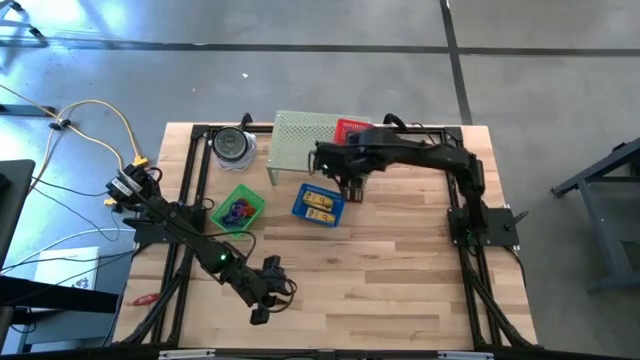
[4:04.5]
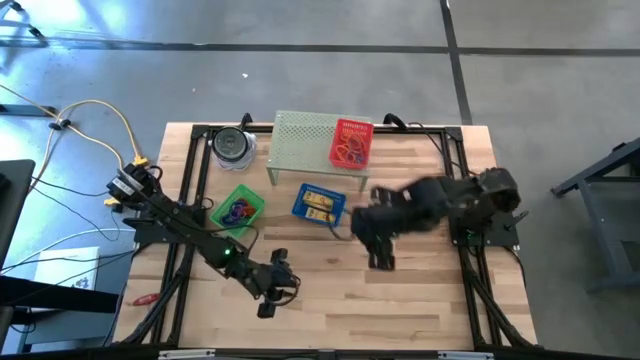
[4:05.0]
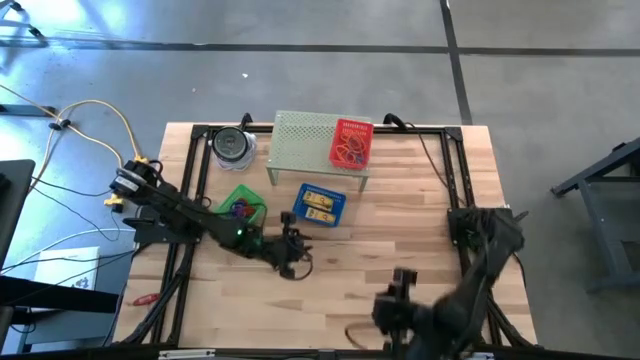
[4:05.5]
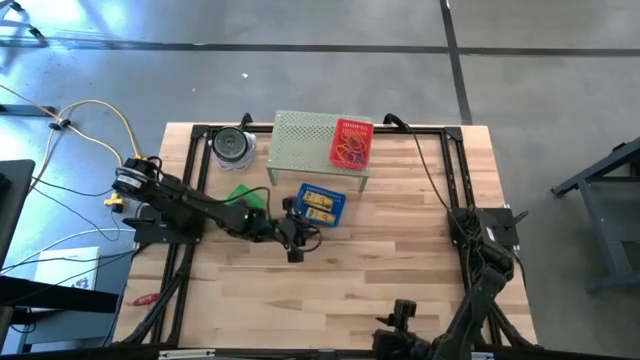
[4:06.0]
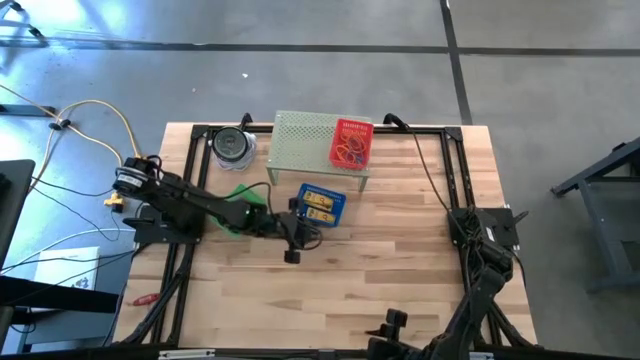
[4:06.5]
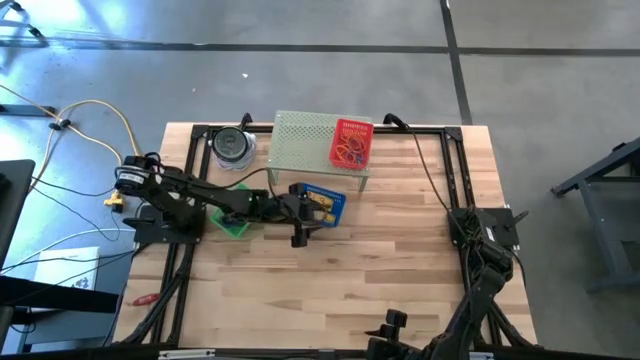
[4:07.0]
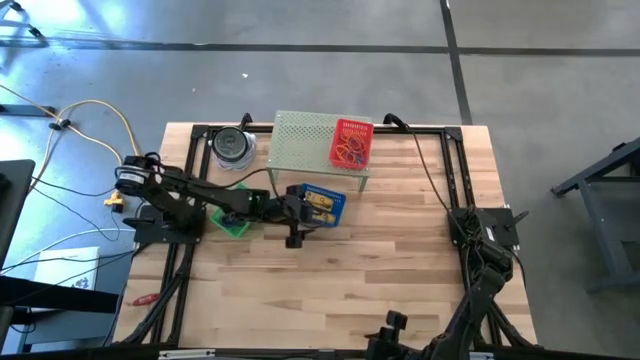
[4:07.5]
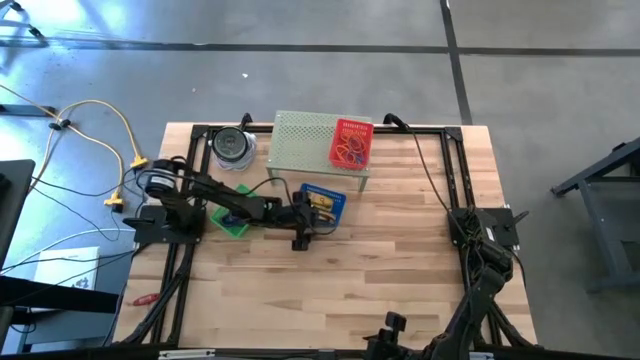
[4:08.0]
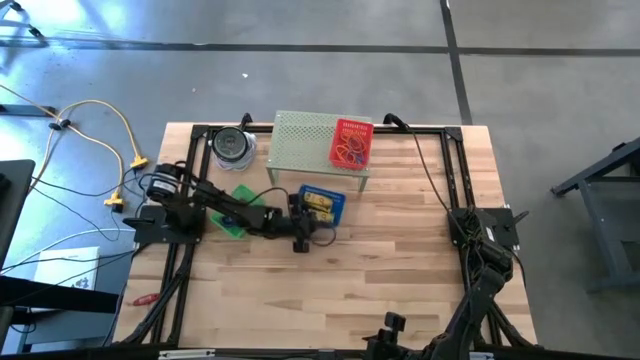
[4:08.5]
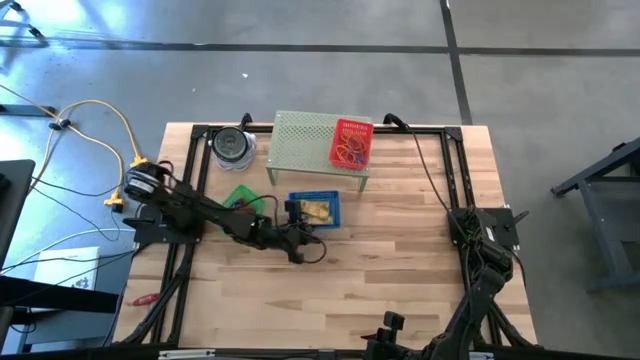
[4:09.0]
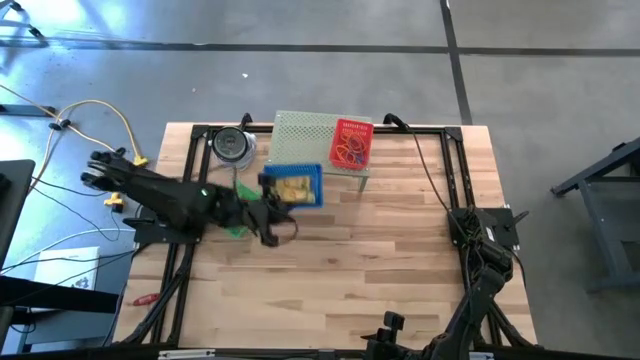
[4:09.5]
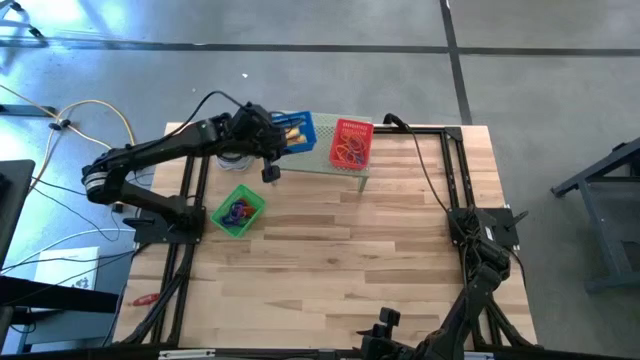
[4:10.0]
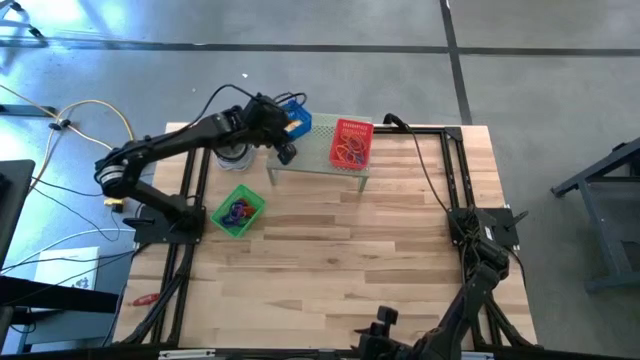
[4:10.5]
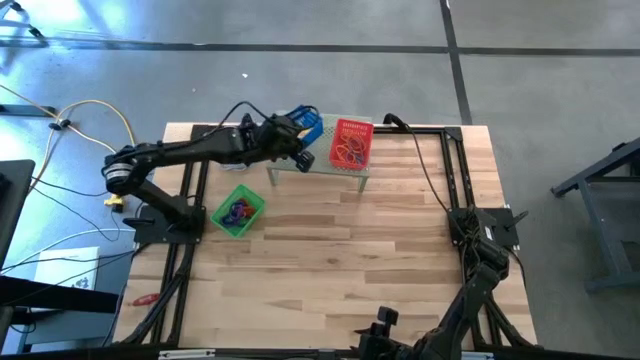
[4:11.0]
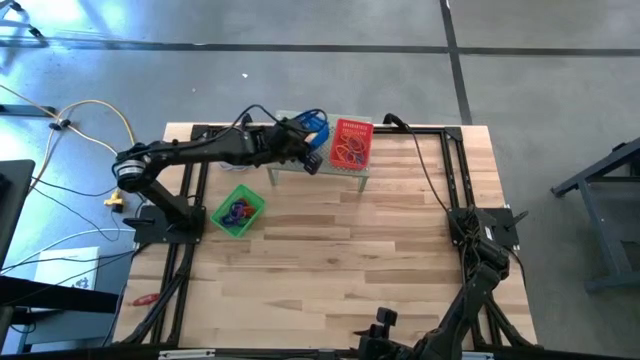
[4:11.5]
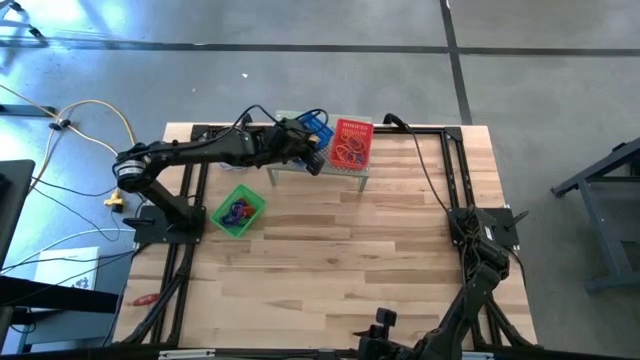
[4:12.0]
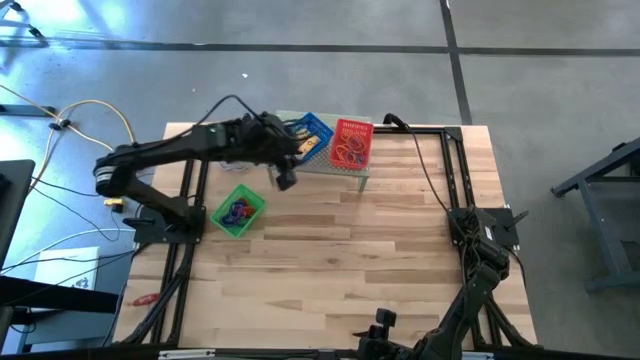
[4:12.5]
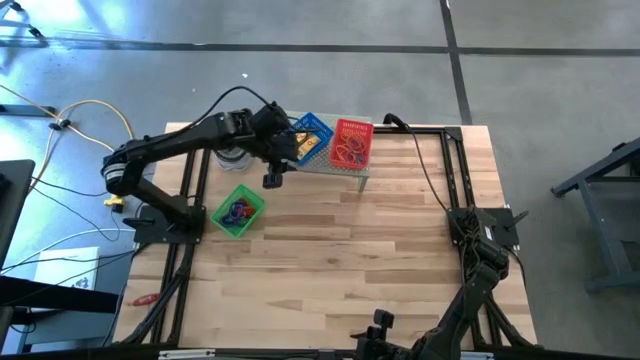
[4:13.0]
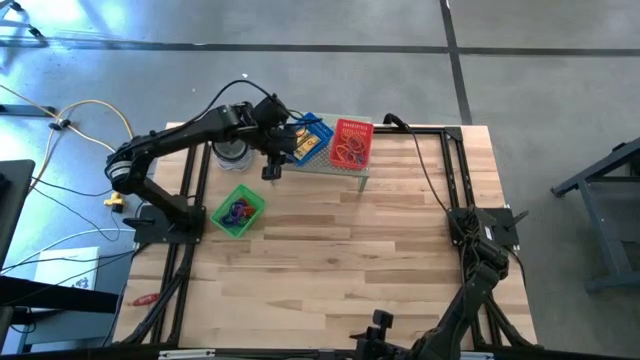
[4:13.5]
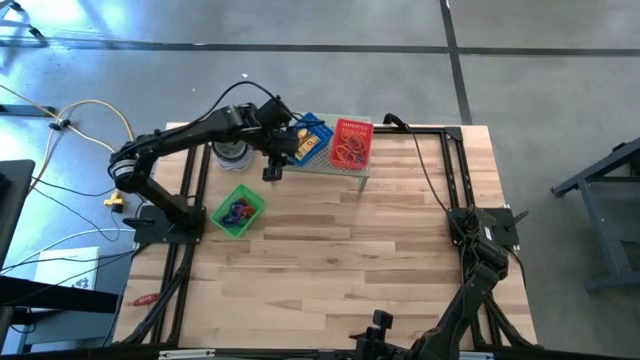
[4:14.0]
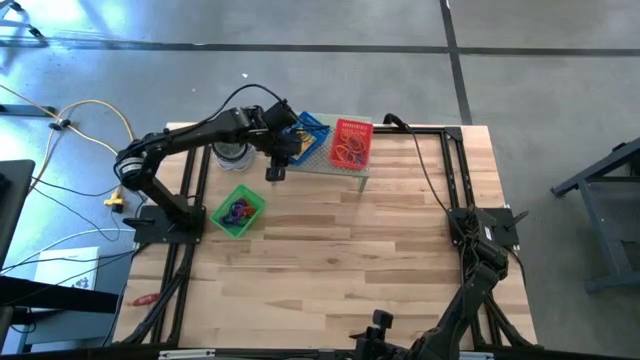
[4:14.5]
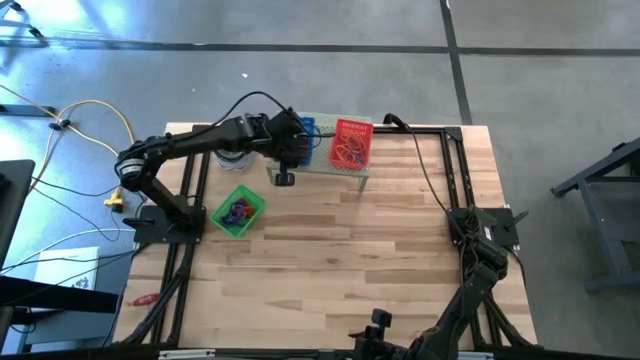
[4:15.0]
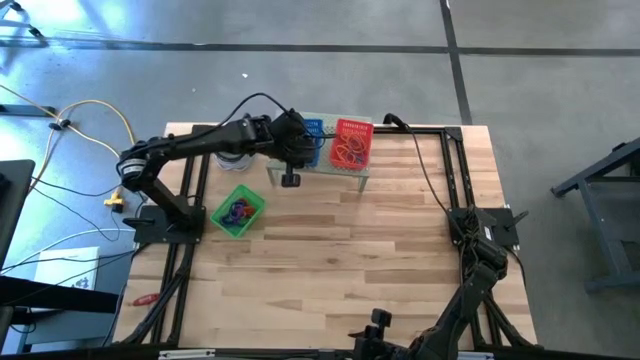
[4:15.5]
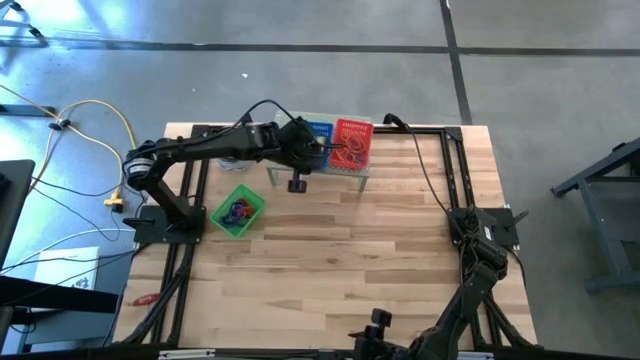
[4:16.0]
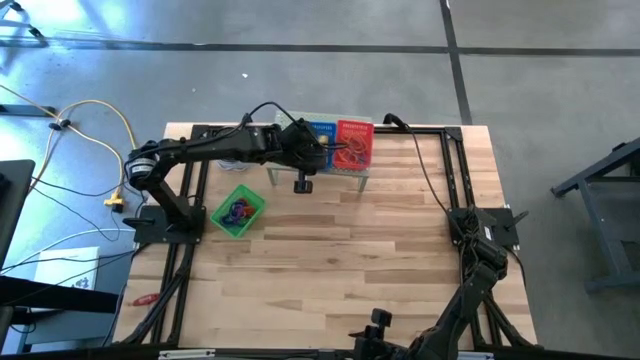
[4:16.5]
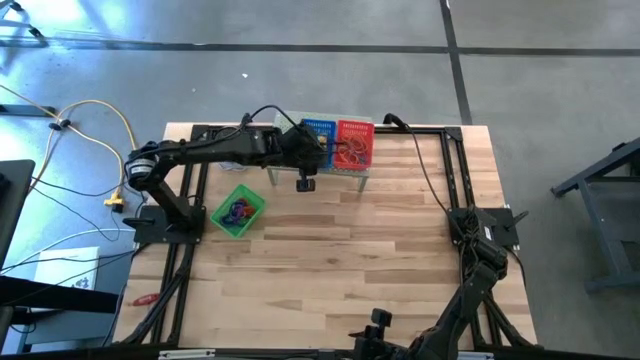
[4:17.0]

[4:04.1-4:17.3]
Task: Pick & Place Office Desk Supplies
Put the blue bin on the shelf

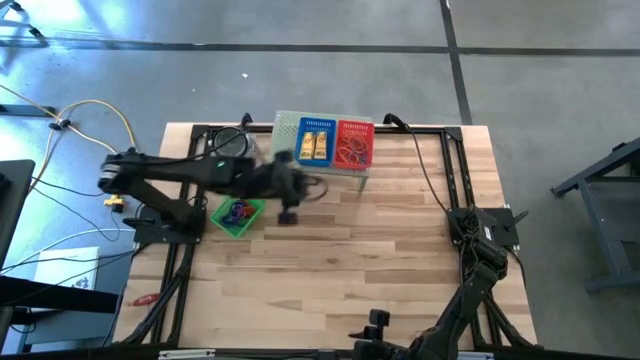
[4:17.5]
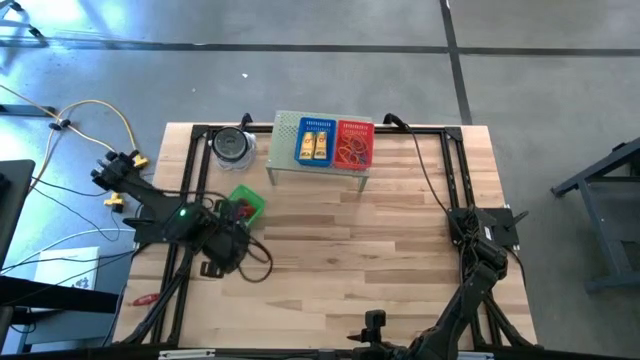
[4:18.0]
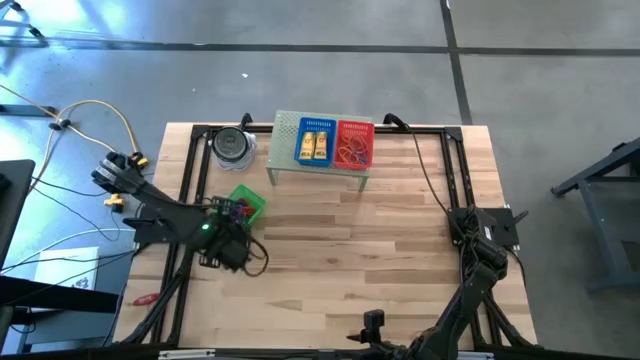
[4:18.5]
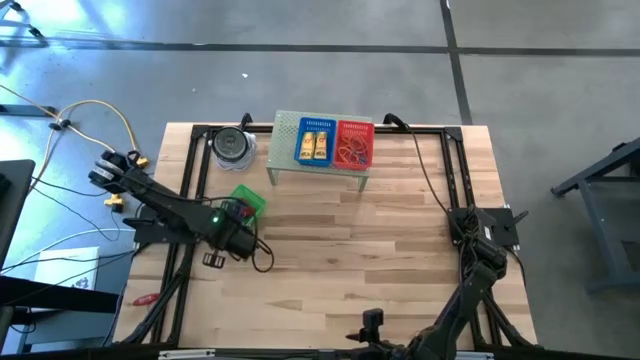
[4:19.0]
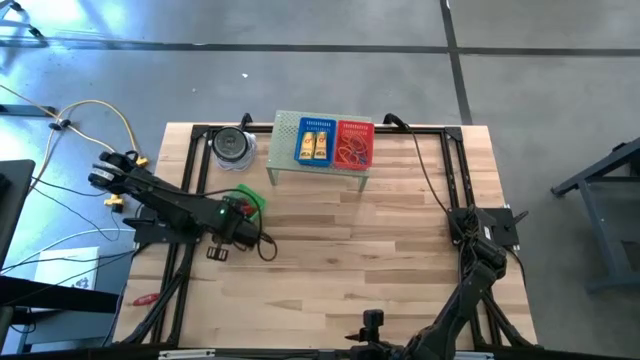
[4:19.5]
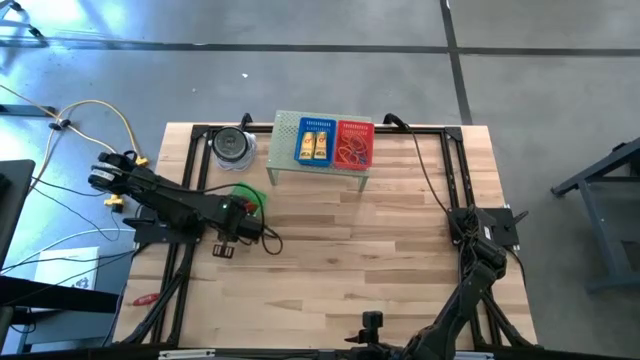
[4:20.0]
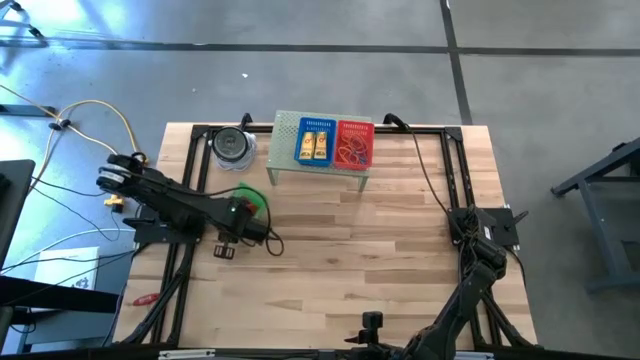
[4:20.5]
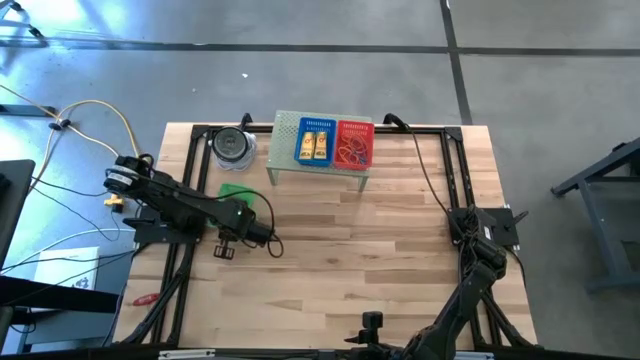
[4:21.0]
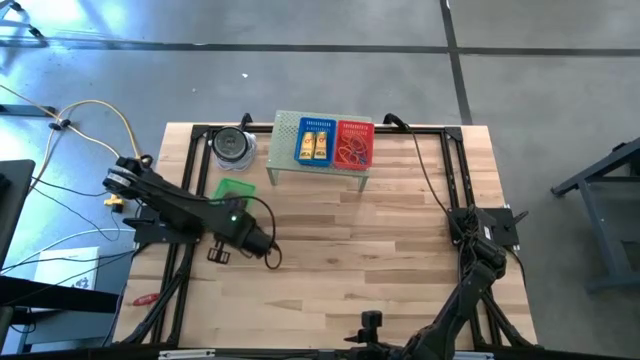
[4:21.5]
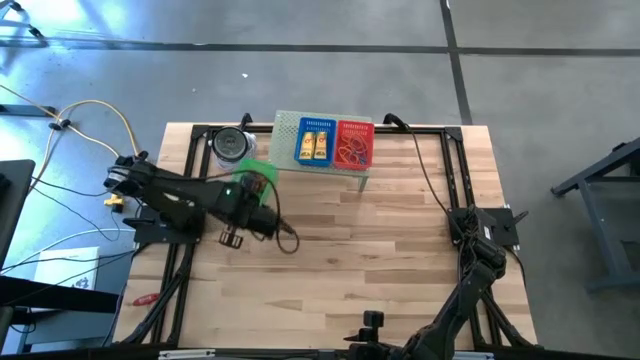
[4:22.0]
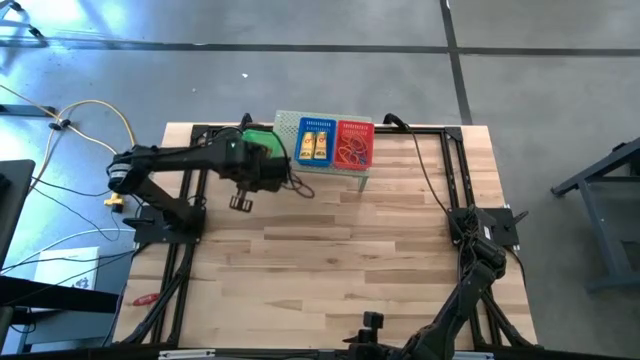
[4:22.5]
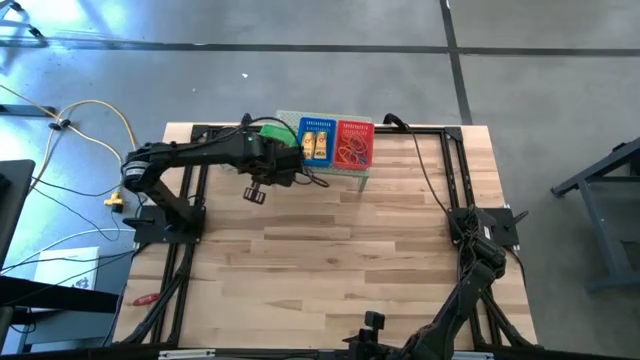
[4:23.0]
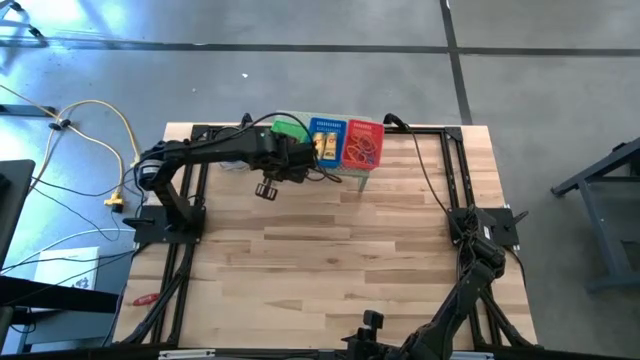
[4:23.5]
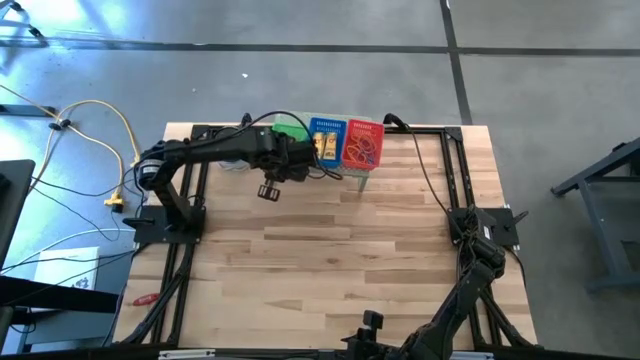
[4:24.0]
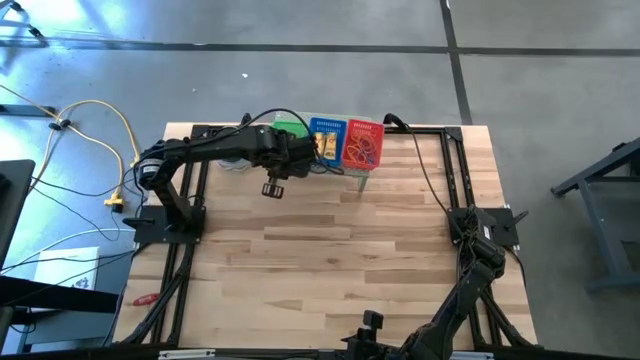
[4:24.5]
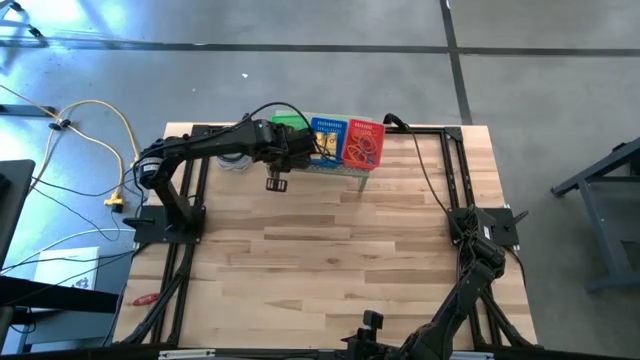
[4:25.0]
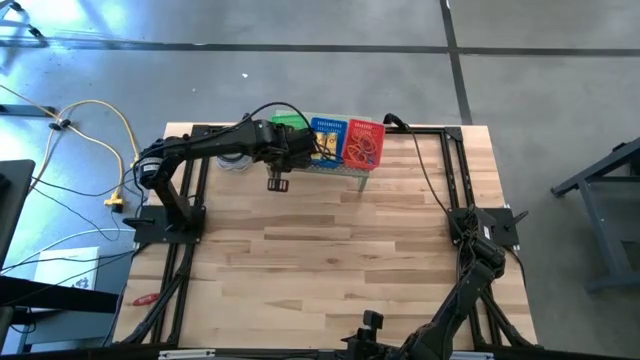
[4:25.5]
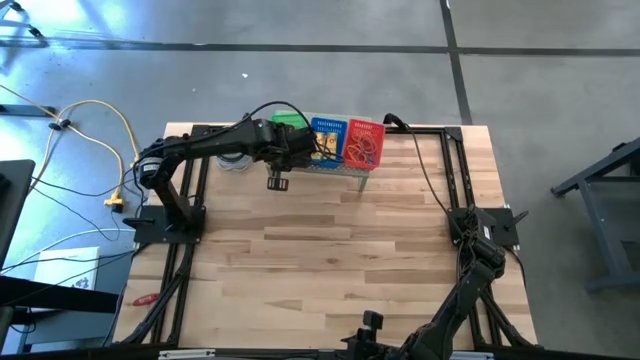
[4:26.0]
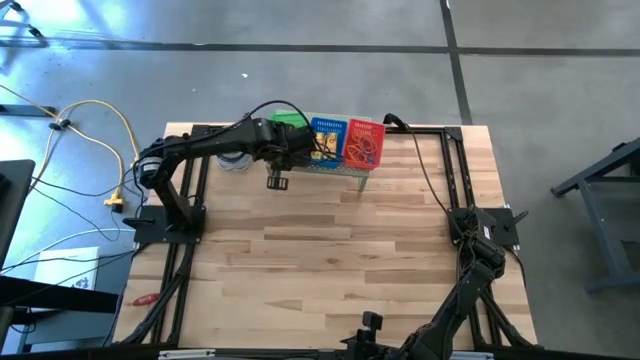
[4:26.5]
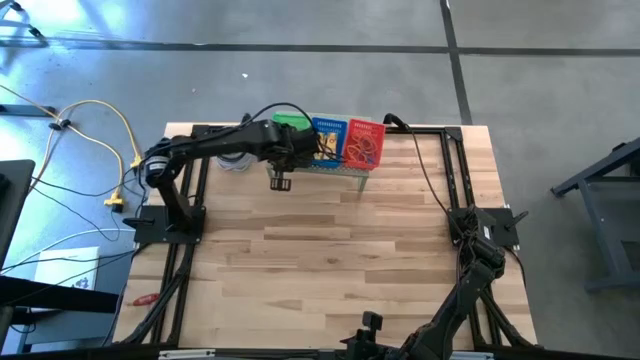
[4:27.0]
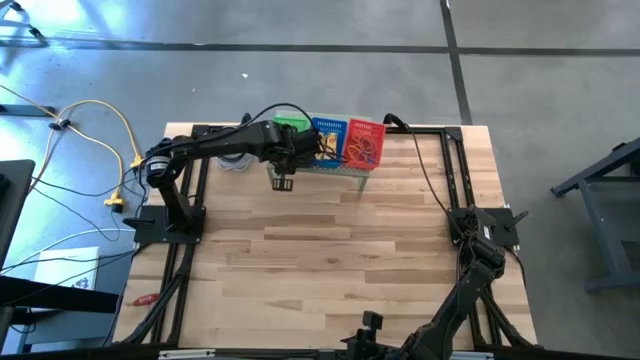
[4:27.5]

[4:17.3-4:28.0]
Put the green bin on the shelf
